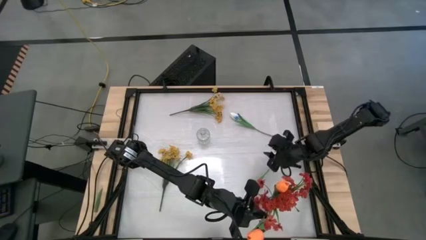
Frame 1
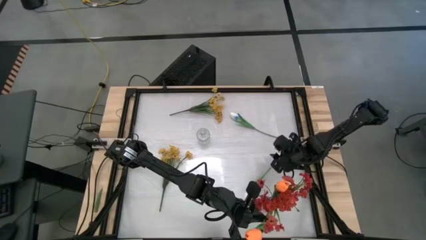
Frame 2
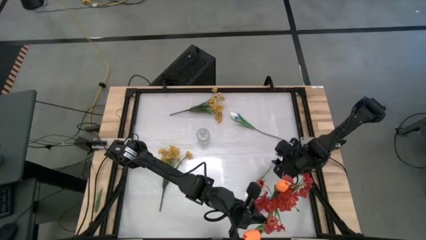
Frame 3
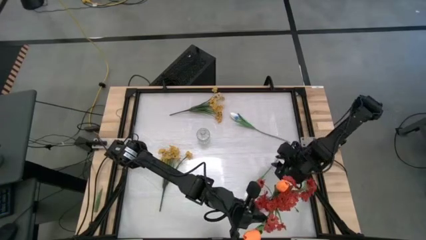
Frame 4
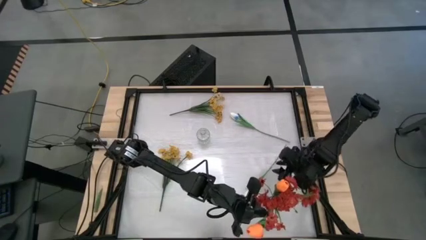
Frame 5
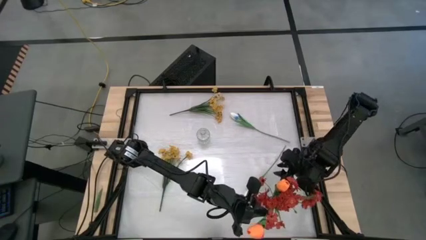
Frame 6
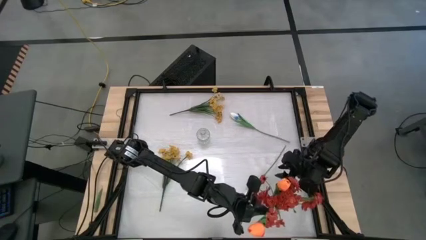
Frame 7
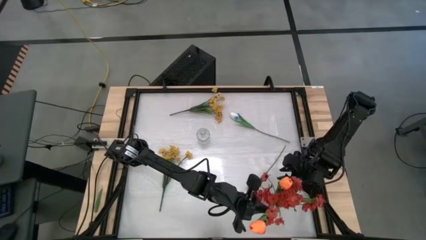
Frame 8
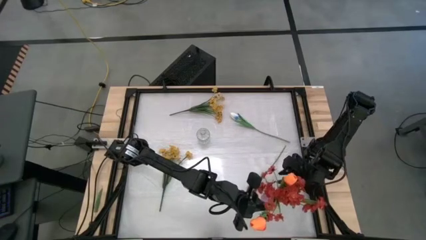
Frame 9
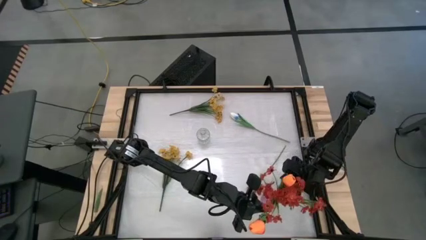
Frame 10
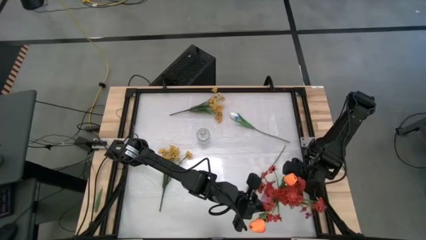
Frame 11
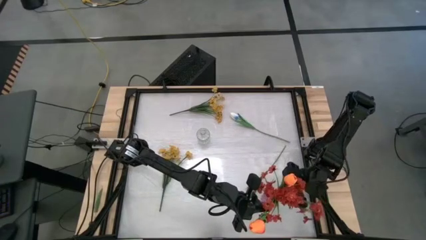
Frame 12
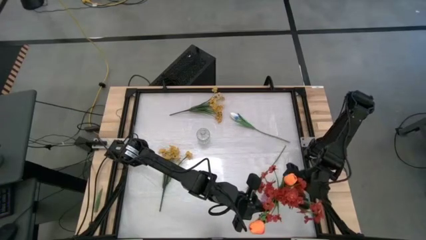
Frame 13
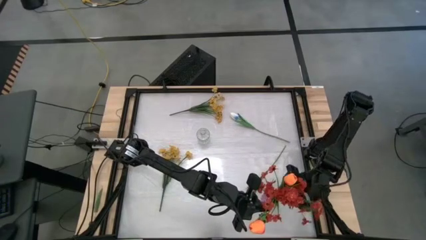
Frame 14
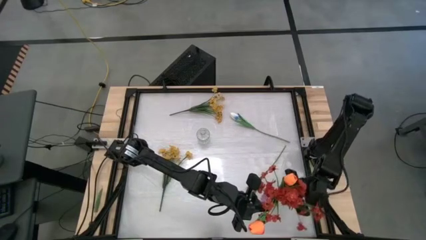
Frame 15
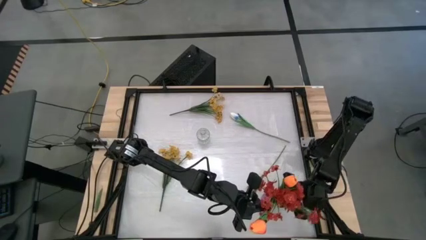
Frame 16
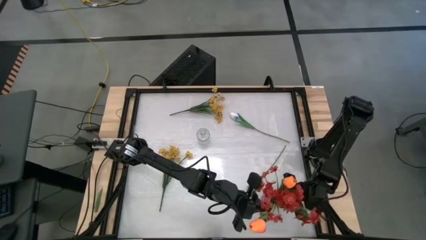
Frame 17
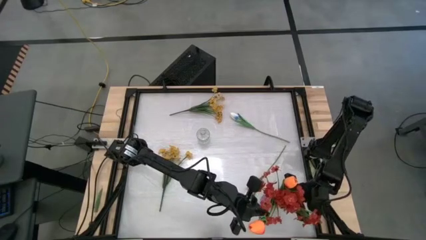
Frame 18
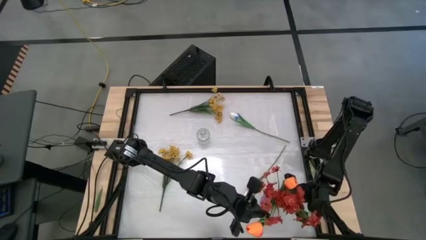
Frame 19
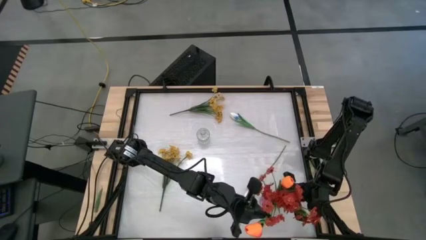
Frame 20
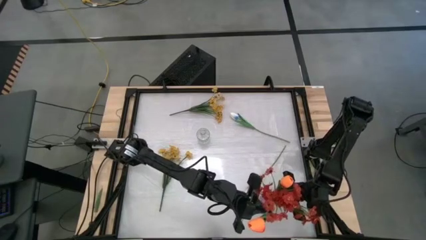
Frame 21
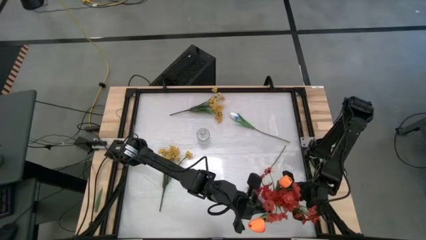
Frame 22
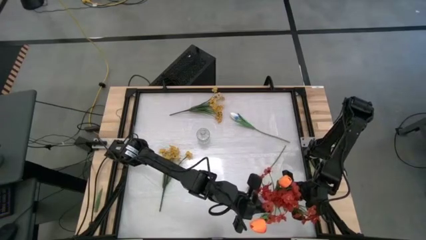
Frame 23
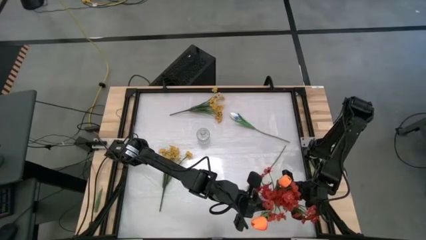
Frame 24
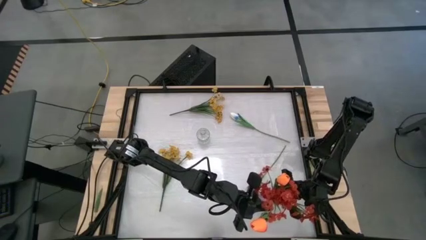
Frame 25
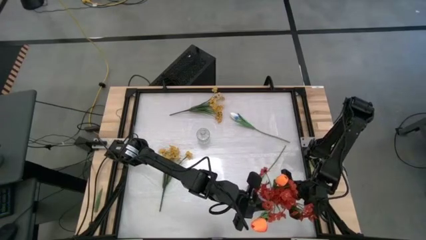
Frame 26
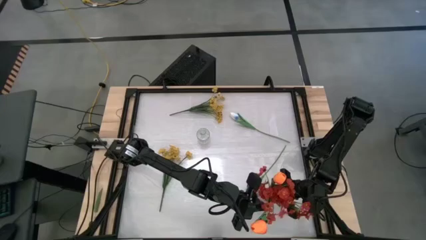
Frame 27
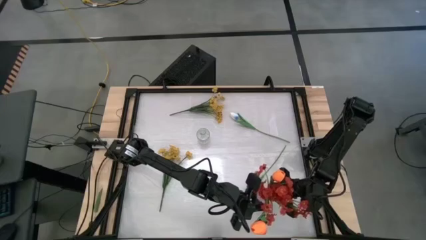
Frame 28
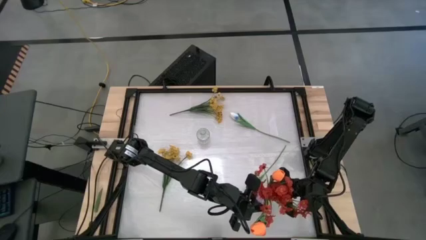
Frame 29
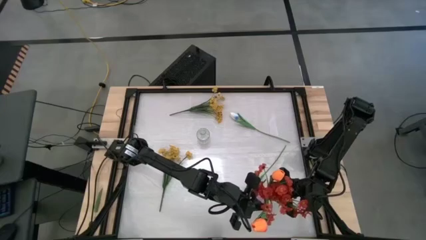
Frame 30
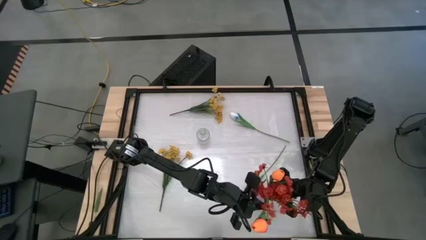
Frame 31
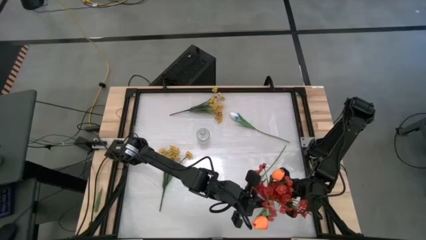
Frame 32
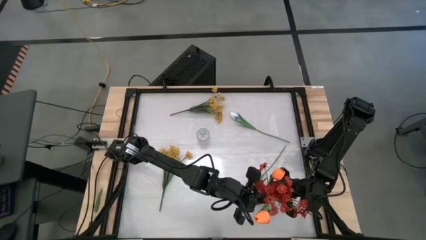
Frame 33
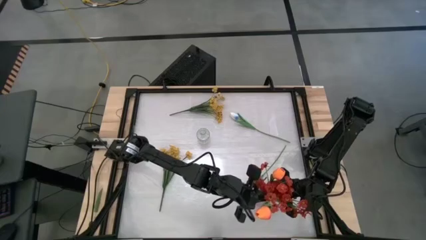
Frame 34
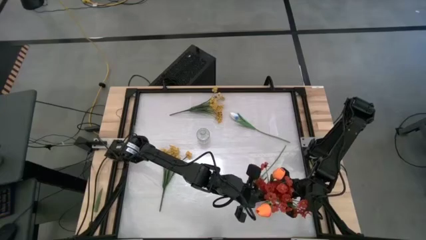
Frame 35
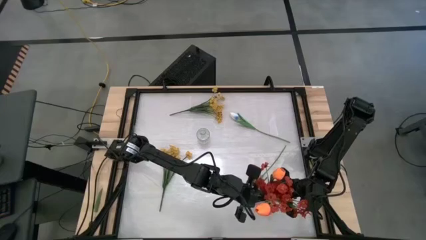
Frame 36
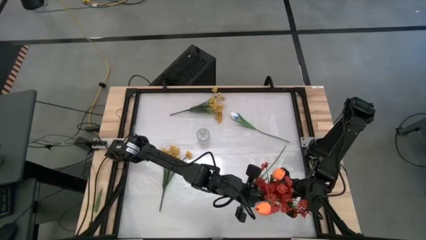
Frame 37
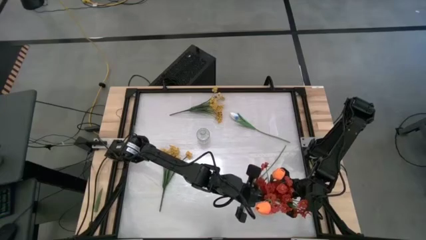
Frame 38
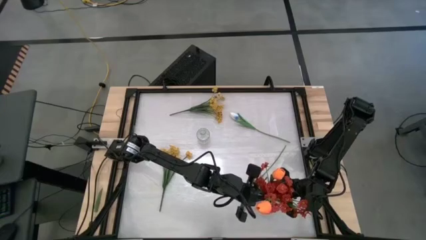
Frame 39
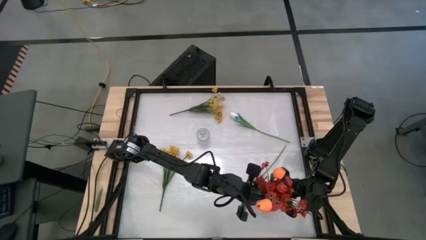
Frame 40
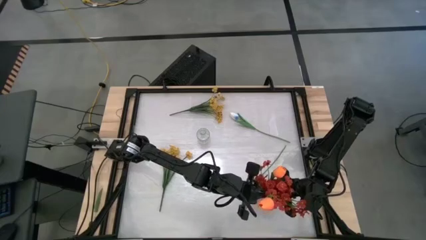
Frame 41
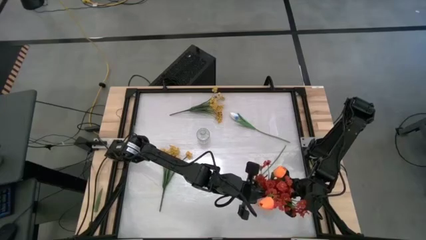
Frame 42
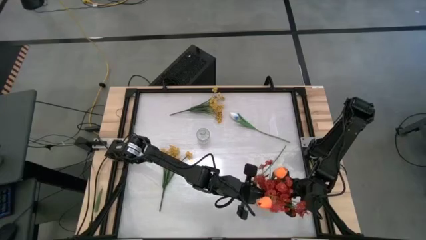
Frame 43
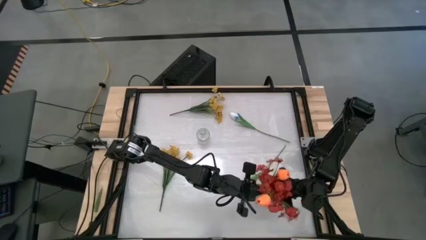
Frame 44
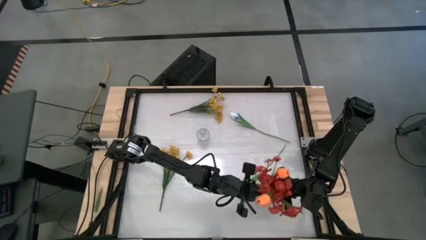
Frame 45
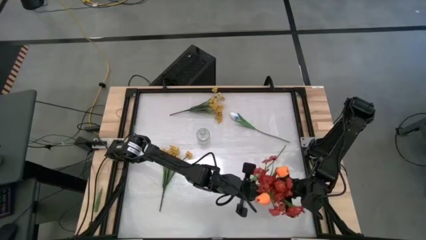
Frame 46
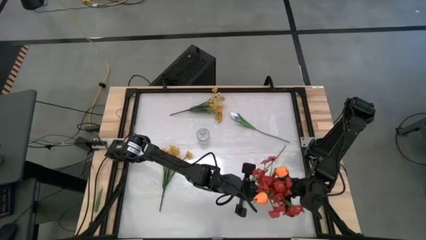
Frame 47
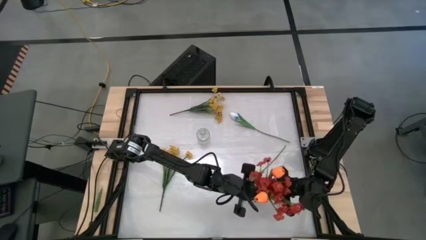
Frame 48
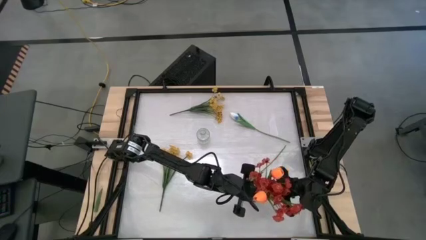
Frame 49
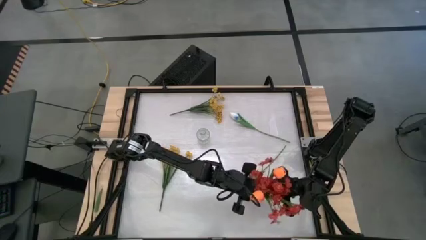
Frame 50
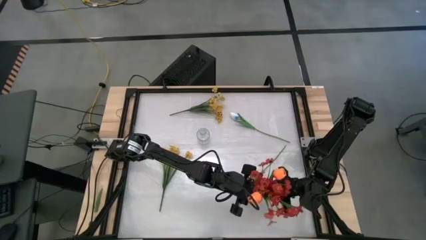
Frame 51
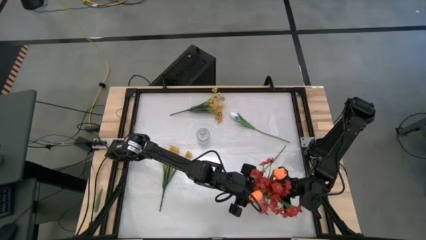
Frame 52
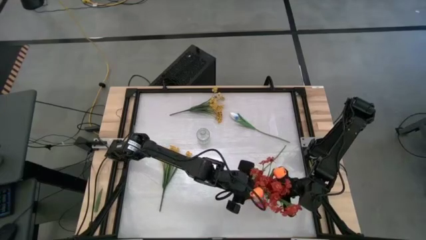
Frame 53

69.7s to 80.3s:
Task: Sort flowers into vase by color
Put the orange flower into the pink vase

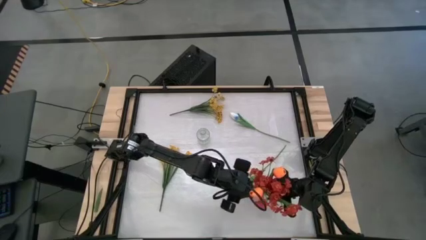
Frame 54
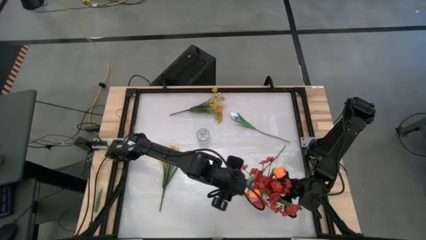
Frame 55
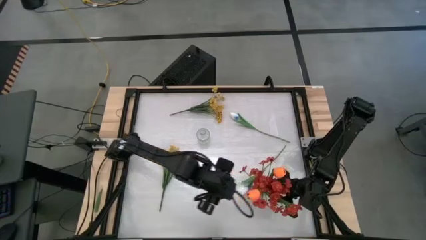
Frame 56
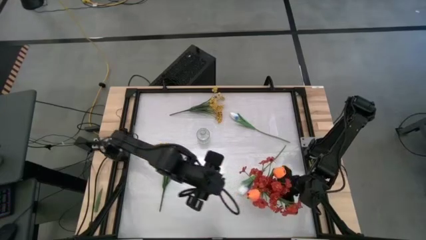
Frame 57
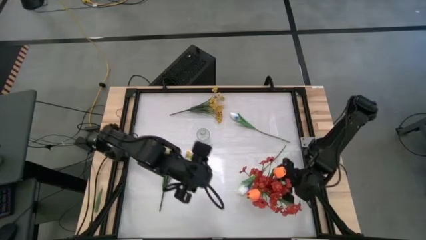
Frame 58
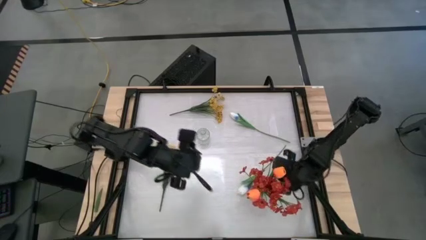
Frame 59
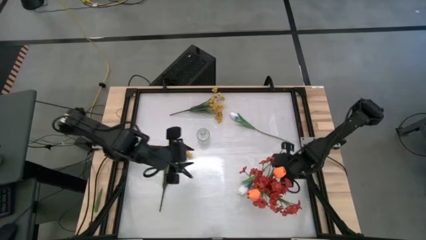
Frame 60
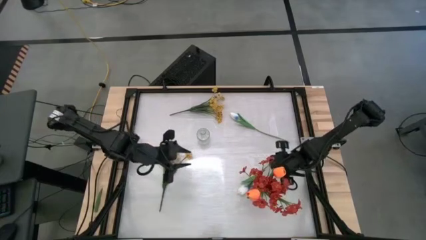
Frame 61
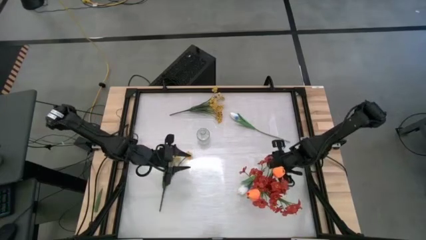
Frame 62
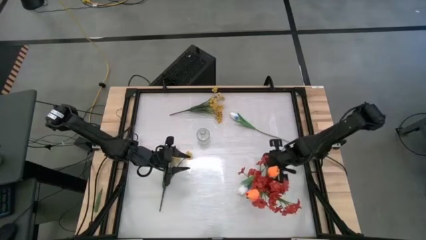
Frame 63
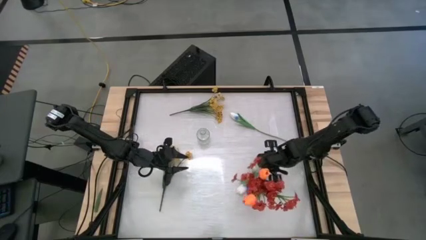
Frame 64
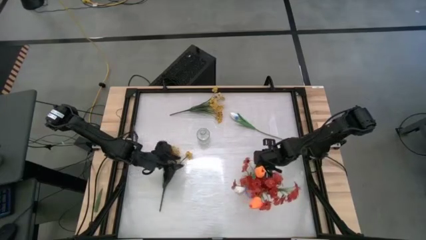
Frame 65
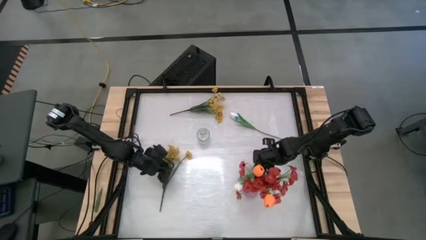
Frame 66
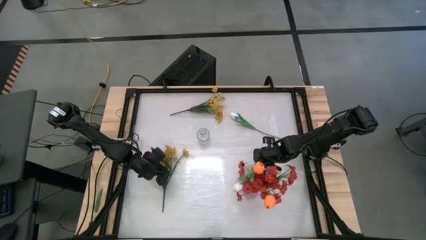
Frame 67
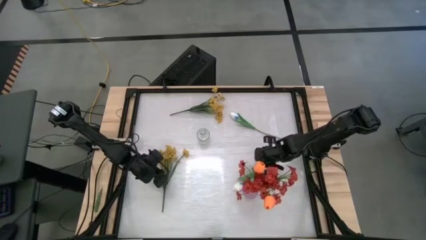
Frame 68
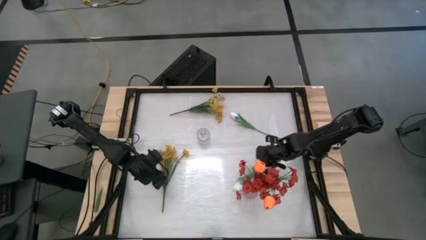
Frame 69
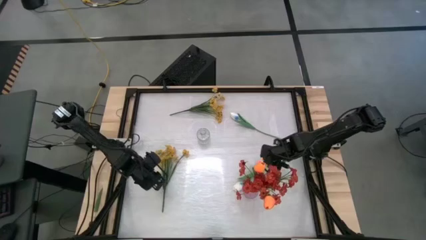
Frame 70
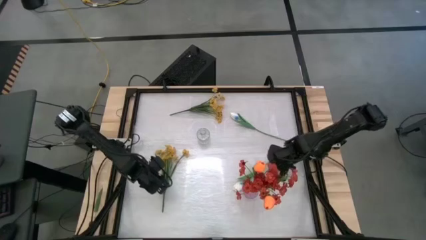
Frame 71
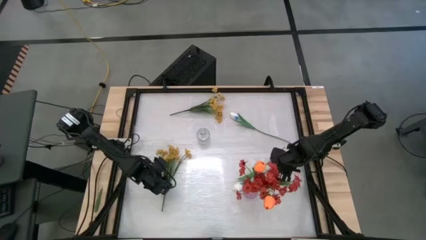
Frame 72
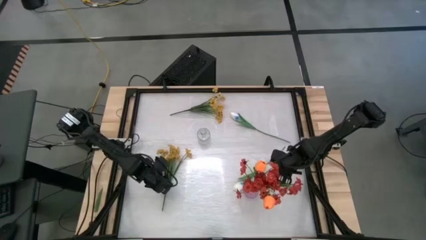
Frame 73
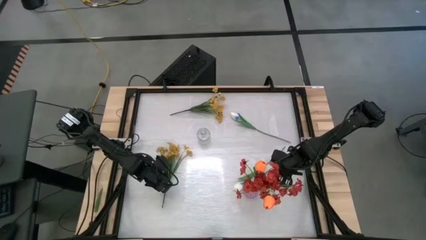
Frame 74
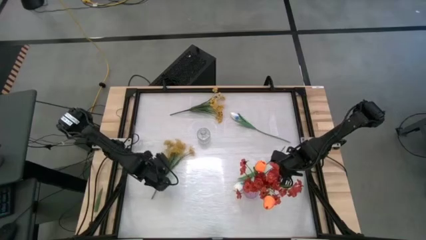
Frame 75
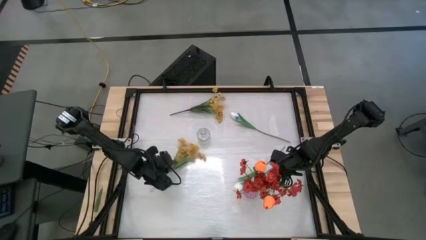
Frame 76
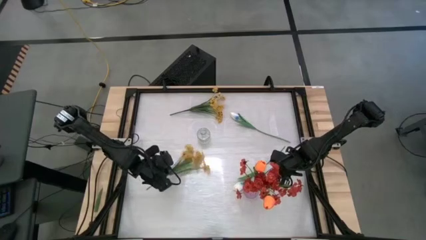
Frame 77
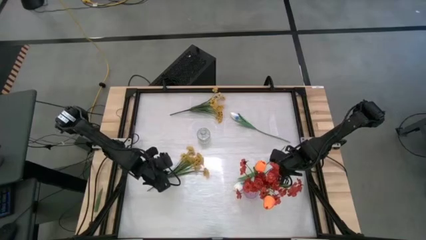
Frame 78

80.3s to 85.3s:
Put the bottom yellow flowers into the transparent vase
